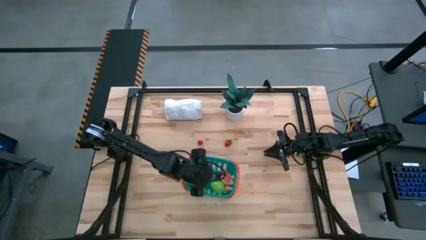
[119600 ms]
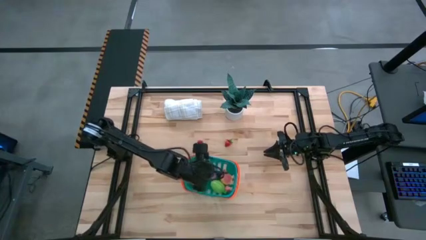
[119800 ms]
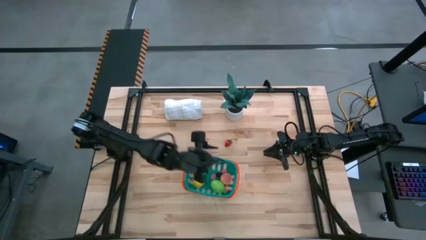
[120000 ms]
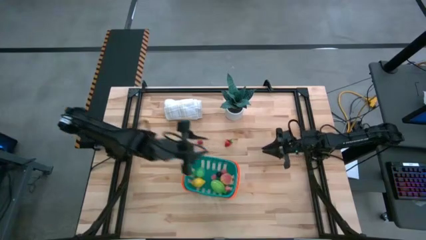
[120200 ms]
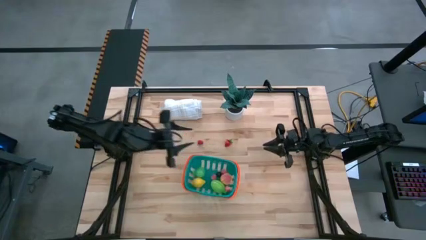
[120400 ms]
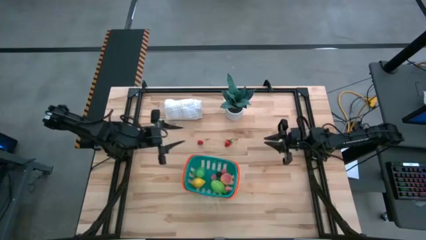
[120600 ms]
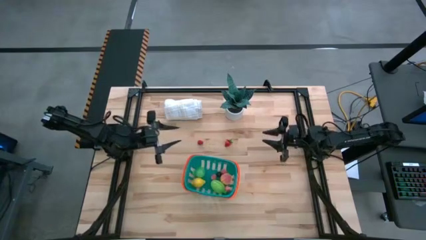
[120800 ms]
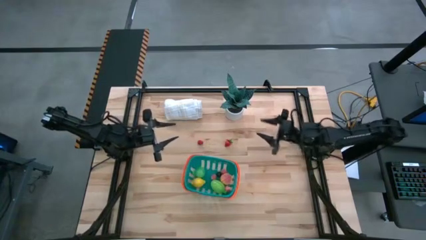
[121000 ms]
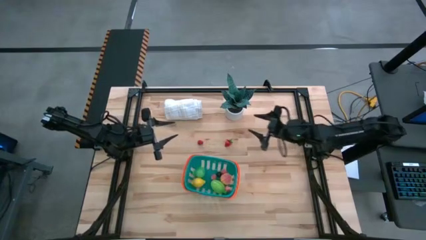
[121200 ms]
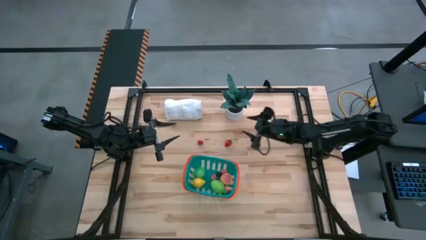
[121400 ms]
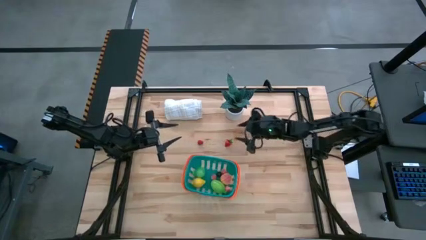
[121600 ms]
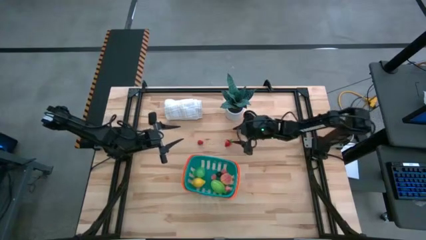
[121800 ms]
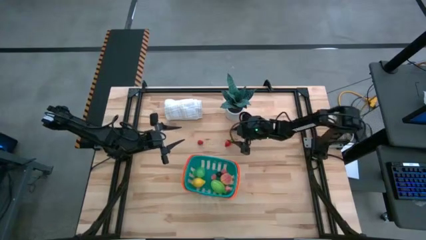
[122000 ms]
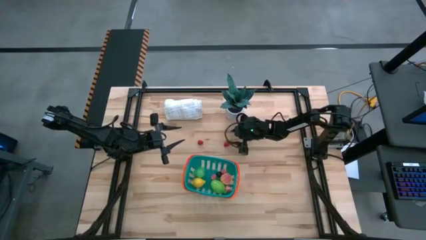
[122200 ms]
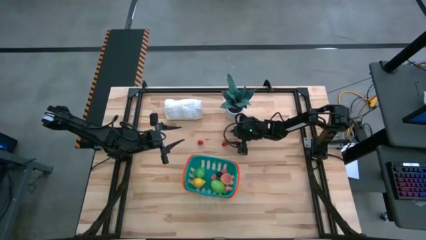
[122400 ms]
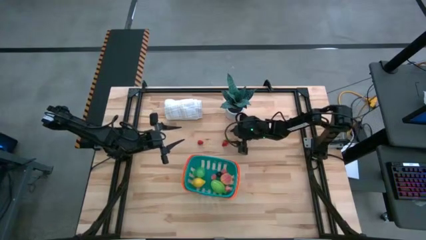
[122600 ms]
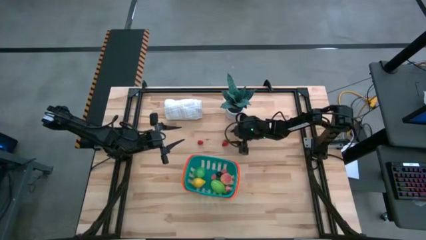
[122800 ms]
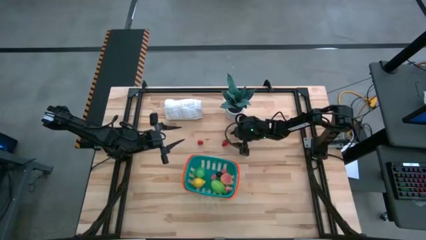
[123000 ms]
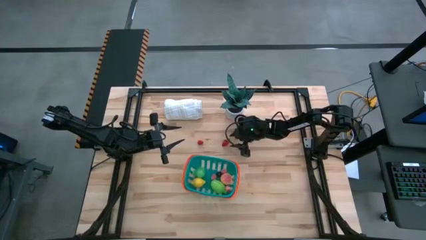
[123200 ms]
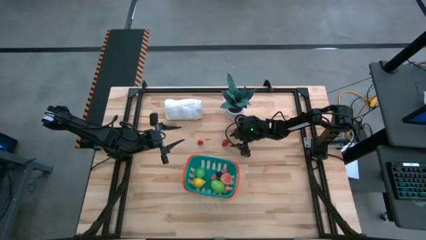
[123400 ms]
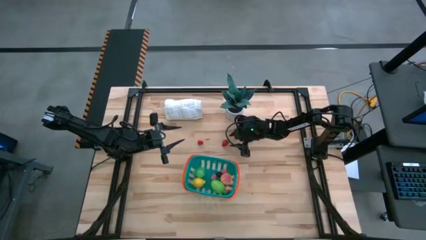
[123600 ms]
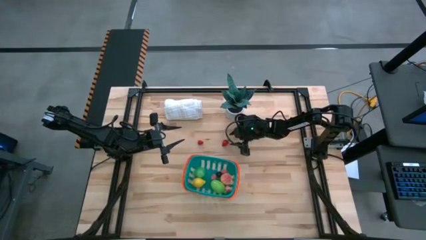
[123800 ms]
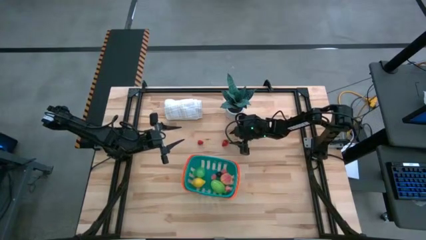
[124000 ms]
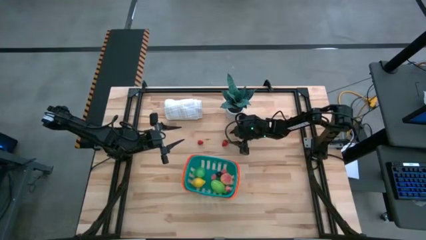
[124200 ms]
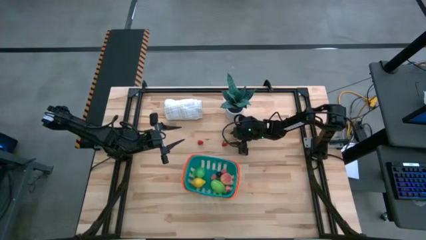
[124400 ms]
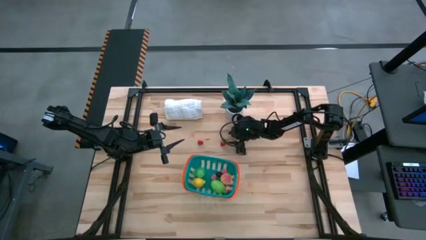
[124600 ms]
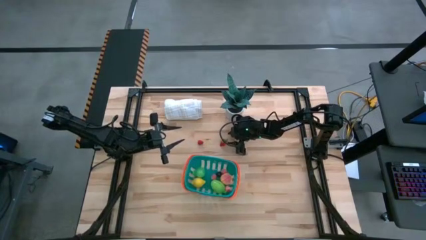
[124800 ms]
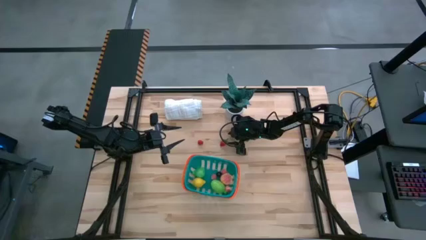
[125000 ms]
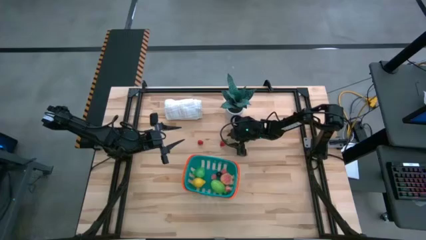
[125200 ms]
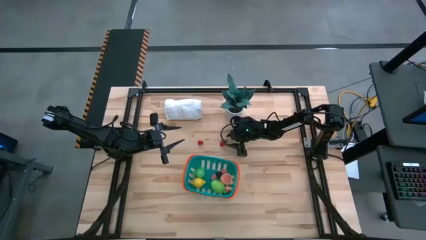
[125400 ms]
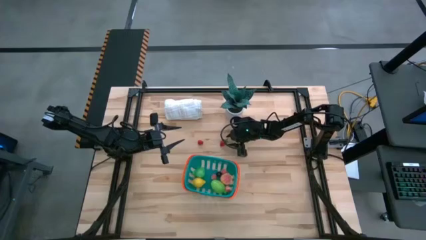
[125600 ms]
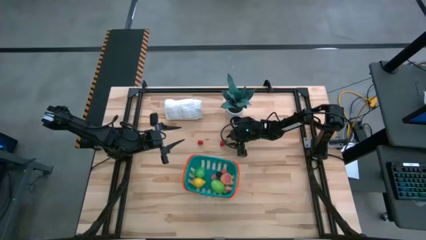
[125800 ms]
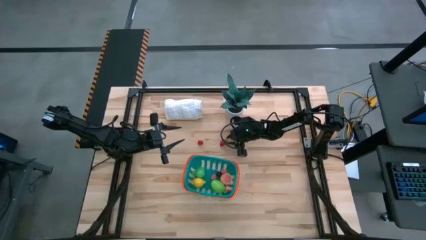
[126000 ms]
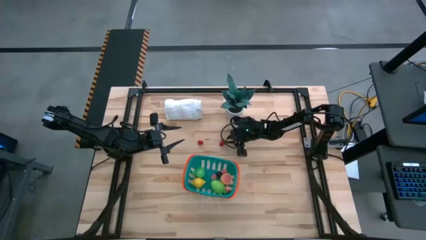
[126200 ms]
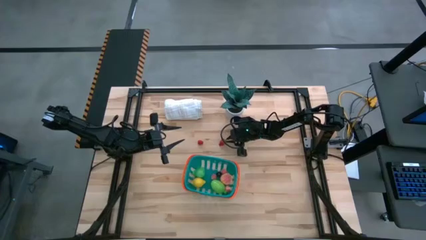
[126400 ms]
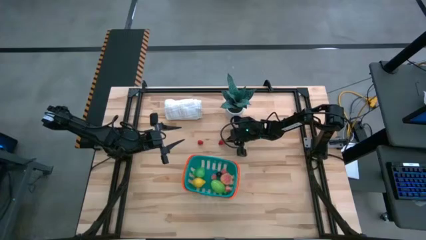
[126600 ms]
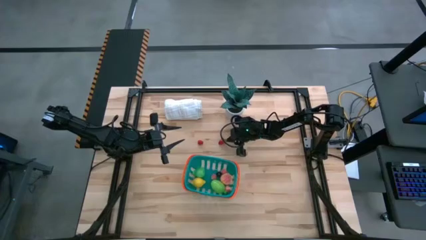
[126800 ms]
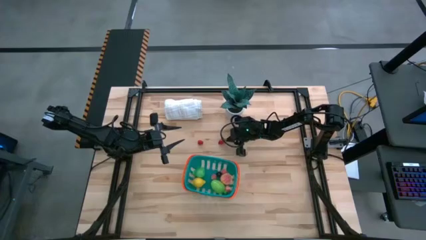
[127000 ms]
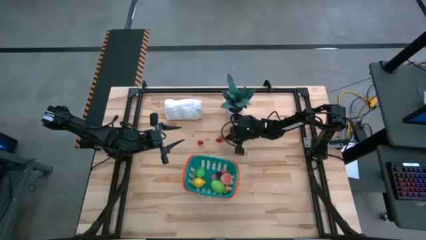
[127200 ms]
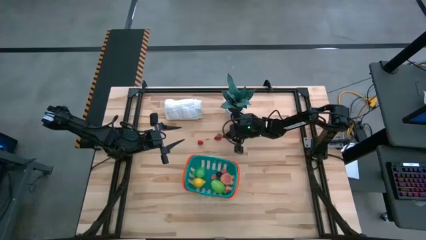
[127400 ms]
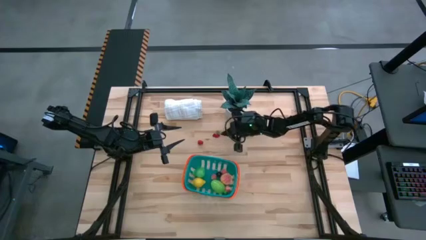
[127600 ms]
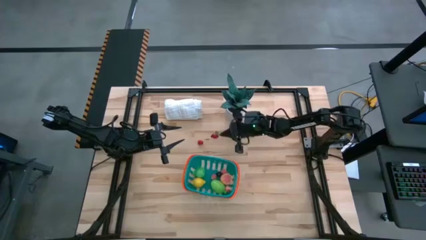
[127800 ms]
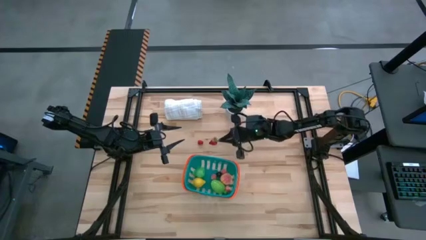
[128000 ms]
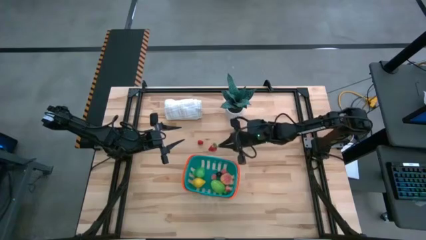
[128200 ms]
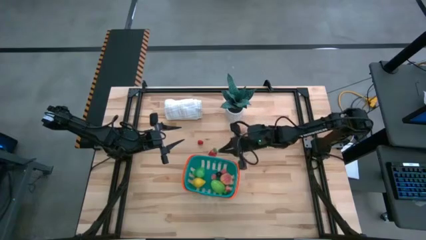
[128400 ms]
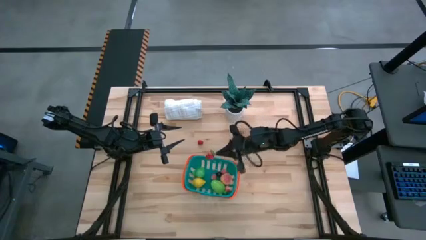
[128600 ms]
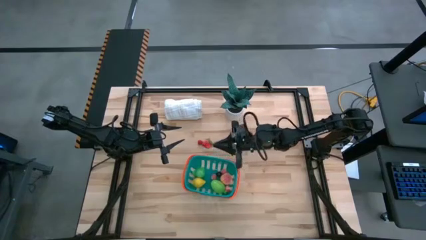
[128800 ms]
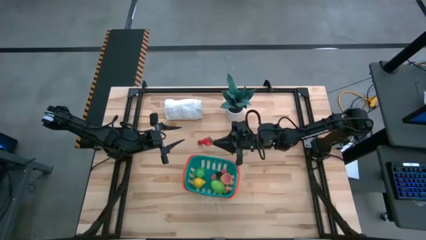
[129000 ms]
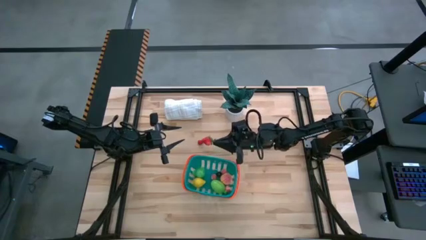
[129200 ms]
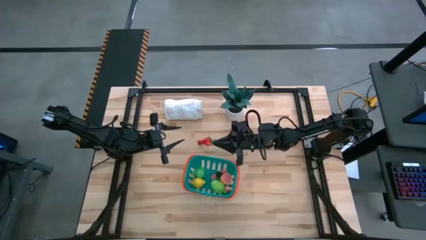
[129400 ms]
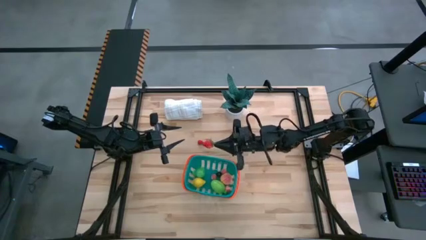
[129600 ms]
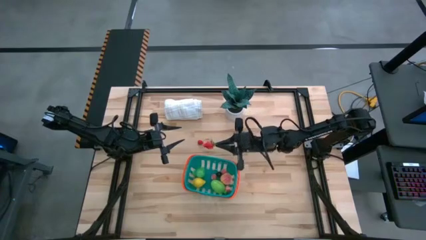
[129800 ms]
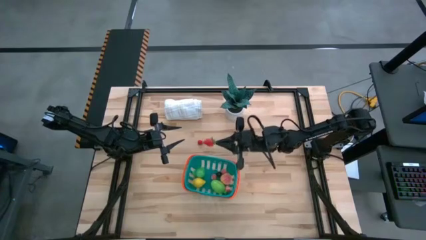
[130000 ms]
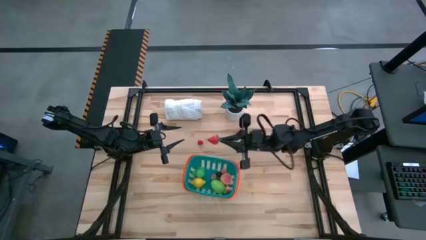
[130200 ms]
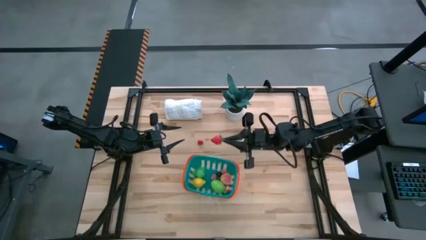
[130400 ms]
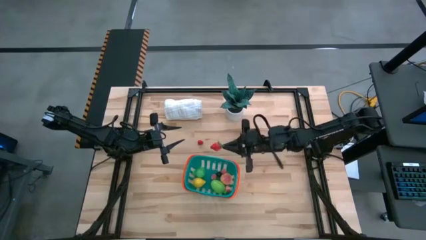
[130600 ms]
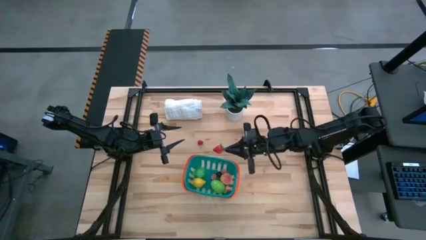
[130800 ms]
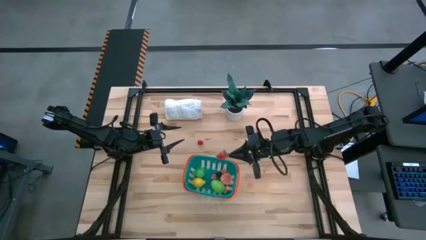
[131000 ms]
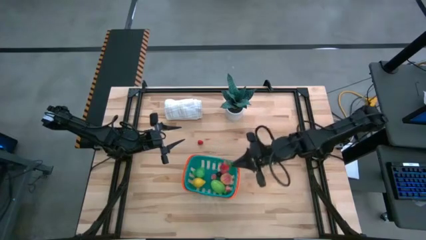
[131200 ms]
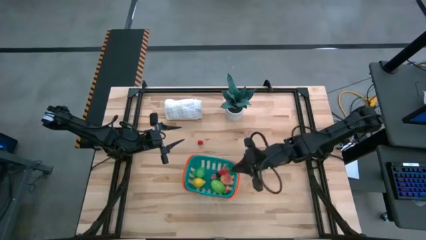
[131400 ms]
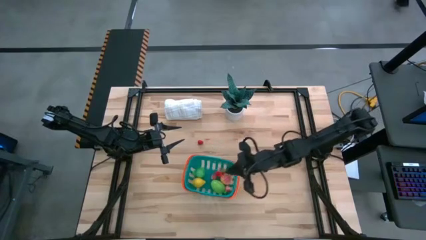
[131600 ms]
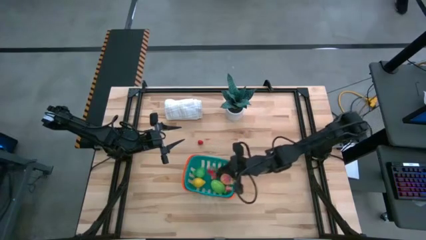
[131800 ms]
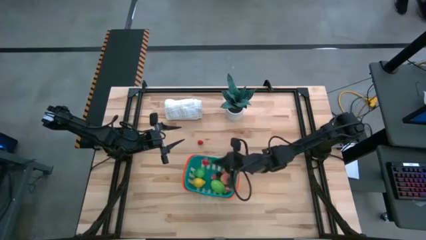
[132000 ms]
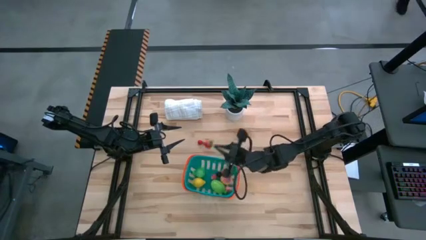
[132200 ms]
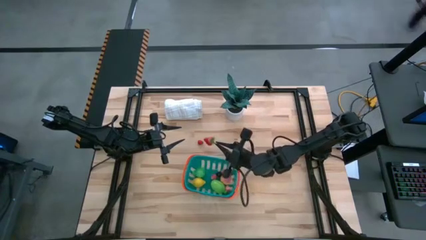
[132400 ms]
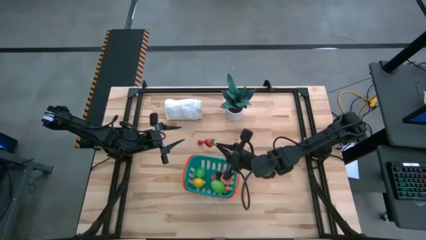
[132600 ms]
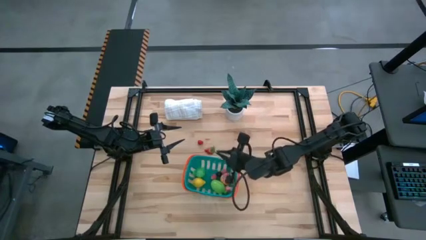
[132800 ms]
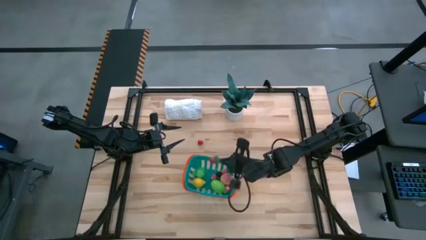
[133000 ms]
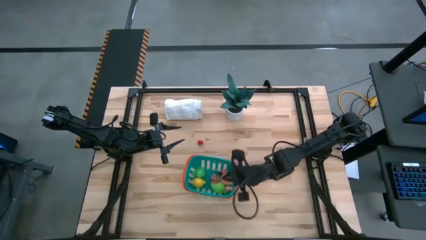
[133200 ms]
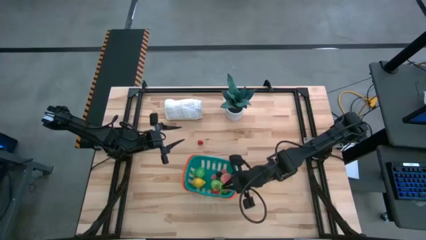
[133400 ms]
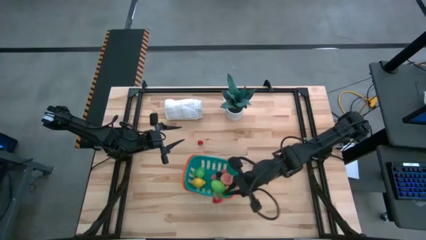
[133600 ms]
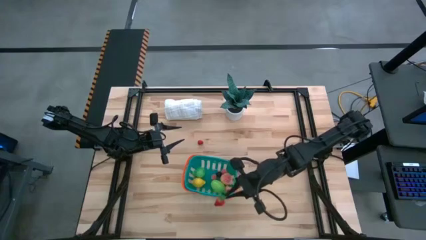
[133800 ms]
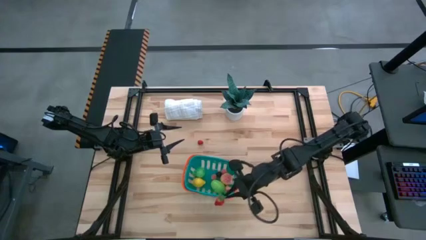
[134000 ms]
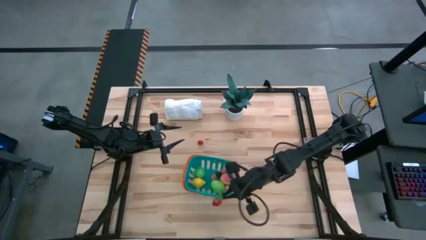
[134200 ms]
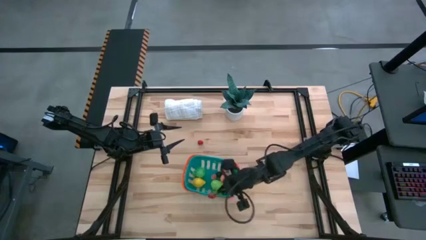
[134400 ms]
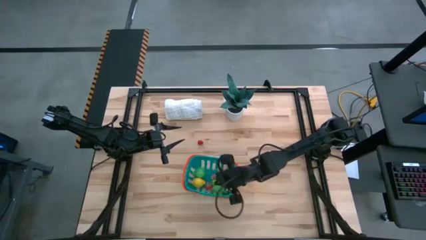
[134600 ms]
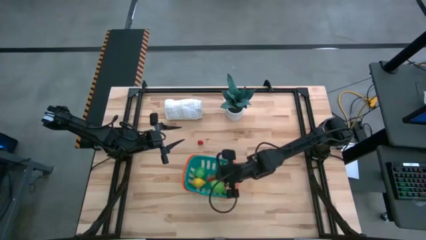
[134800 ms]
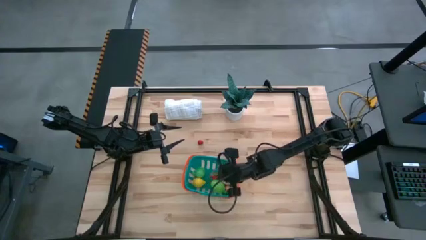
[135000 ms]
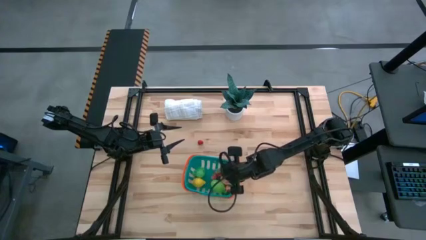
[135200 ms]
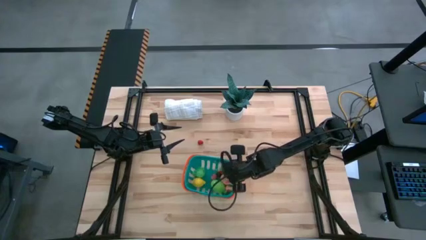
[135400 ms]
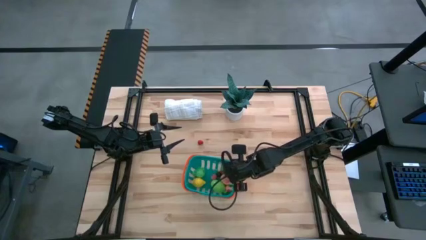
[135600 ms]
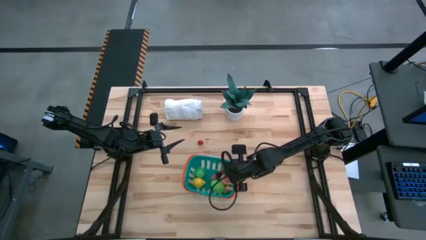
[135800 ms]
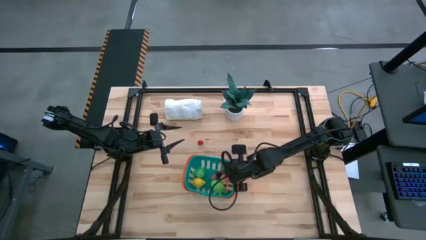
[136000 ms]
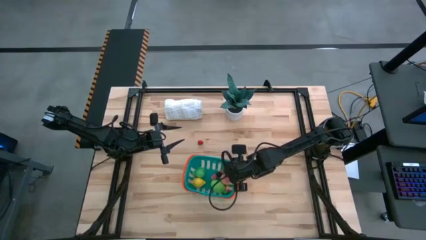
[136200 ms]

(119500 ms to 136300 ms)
Task: Pick and placing Produce into tupperware
Put the red strawberry into the blue bin

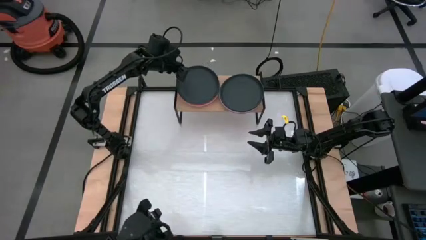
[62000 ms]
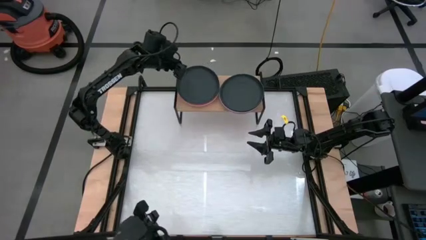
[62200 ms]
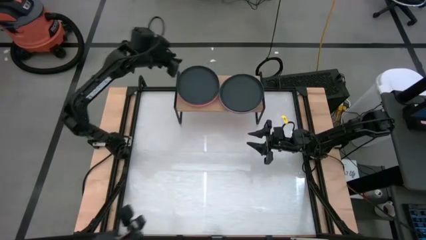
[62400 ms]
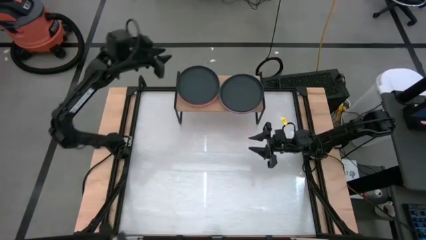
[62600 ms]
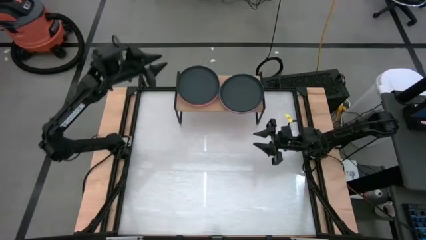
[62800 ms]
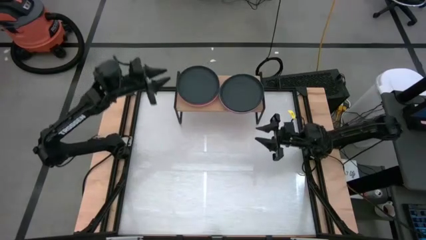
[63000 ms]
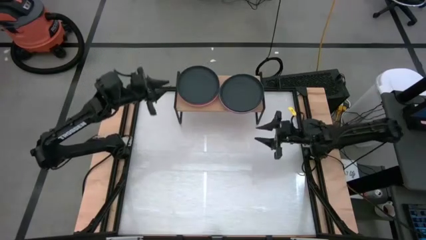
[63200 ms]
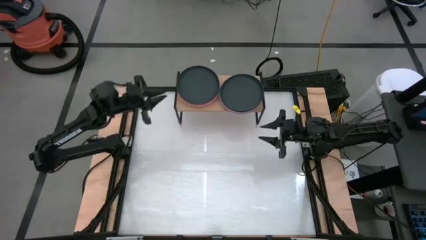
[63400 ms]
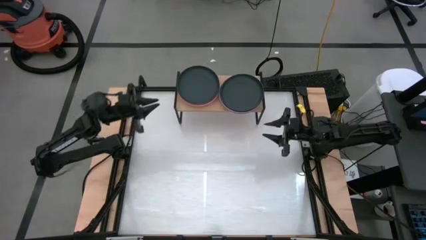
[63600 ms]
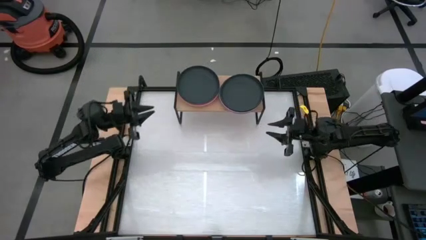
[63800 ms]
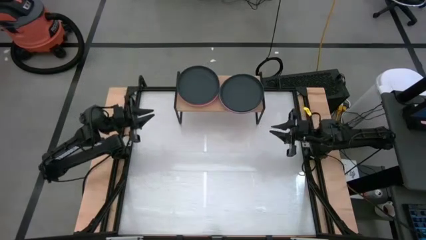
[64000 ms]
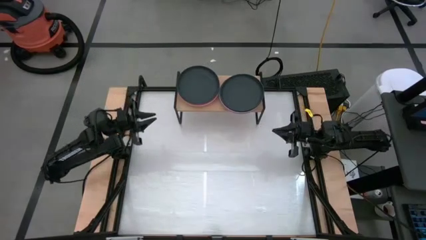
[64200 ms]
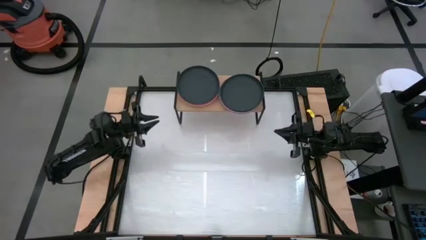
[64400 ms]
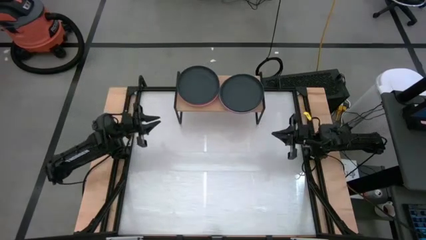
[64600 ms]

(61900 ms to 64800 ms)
Task: Place and stack plates onto a shelf
Return to Home Position
